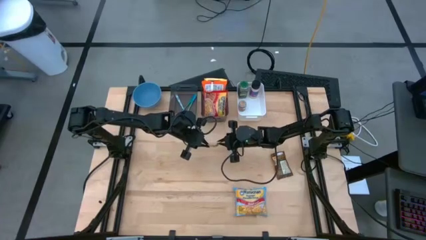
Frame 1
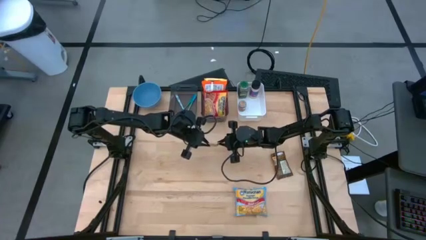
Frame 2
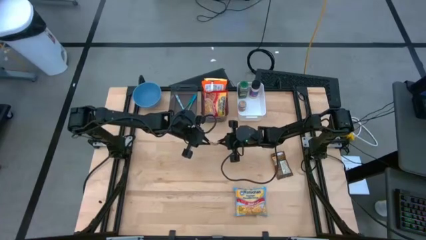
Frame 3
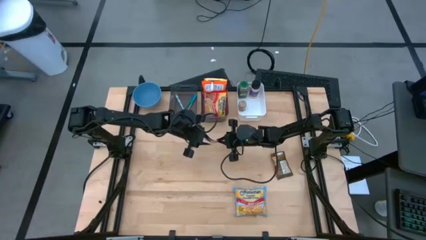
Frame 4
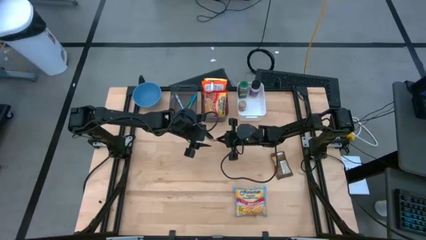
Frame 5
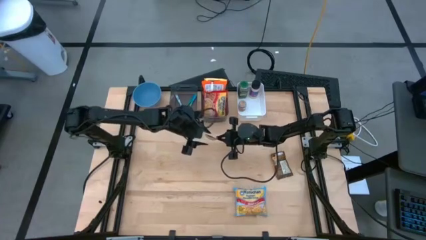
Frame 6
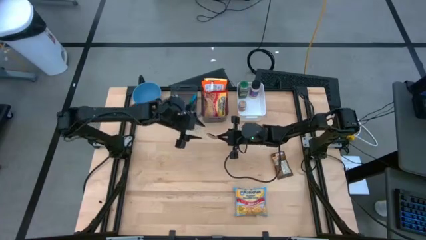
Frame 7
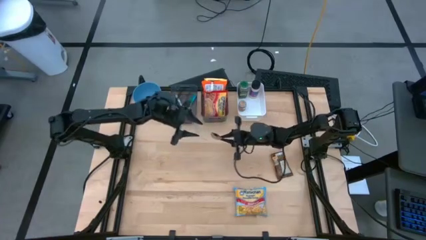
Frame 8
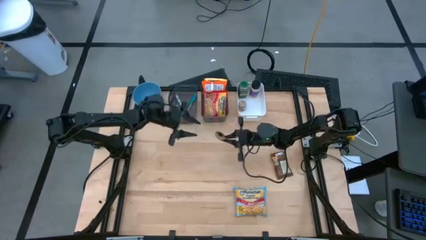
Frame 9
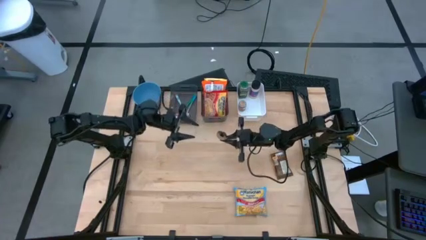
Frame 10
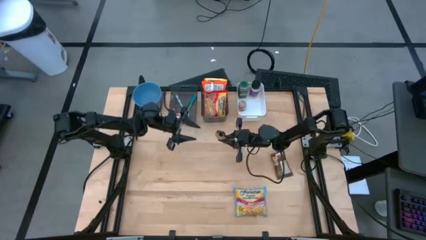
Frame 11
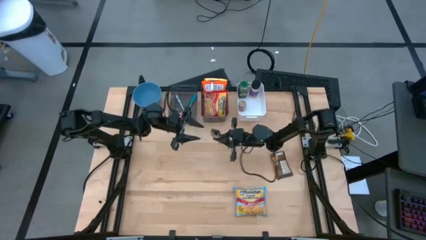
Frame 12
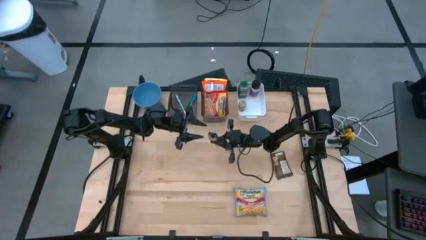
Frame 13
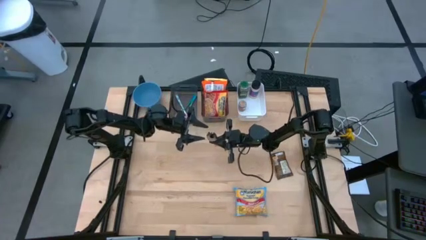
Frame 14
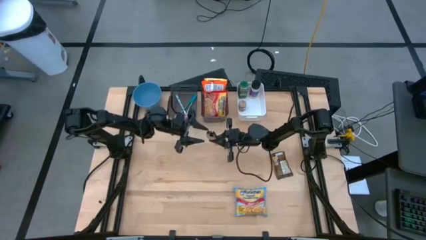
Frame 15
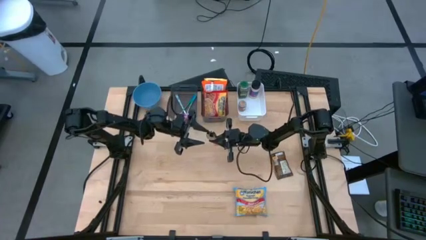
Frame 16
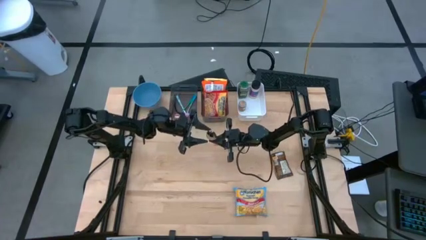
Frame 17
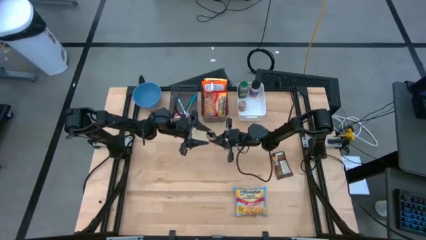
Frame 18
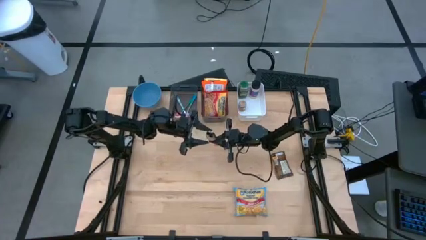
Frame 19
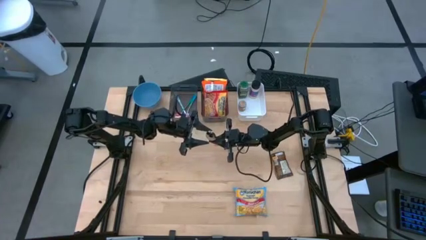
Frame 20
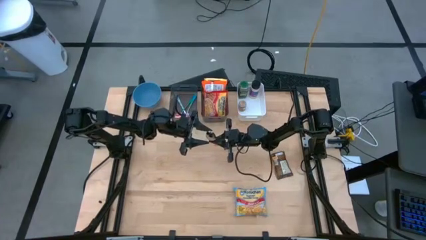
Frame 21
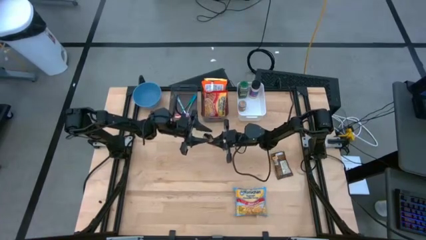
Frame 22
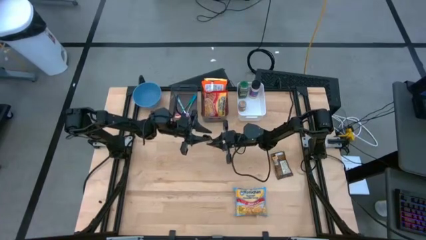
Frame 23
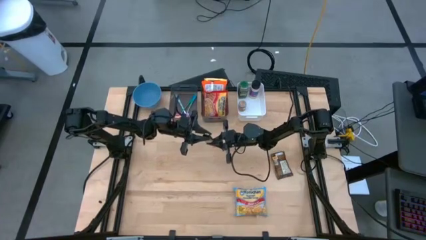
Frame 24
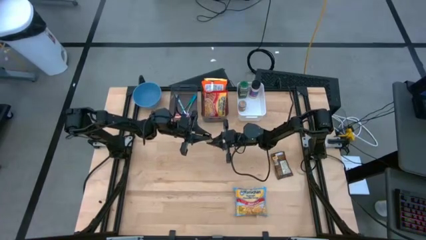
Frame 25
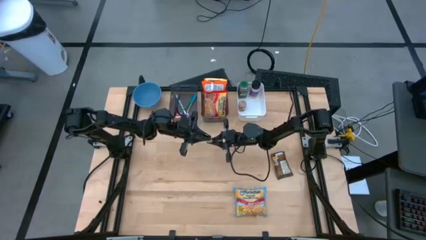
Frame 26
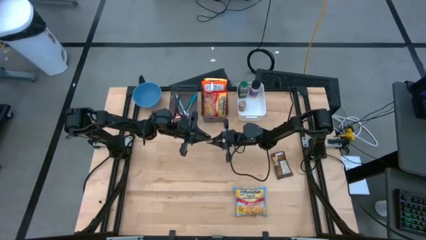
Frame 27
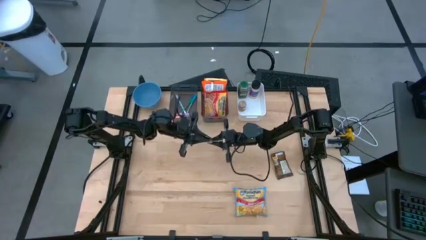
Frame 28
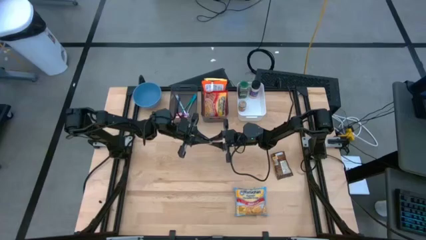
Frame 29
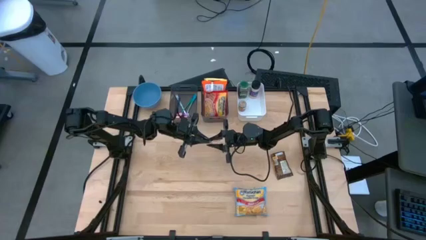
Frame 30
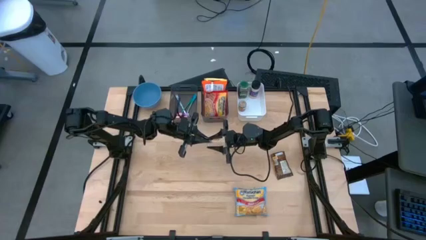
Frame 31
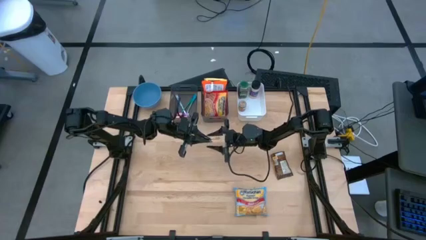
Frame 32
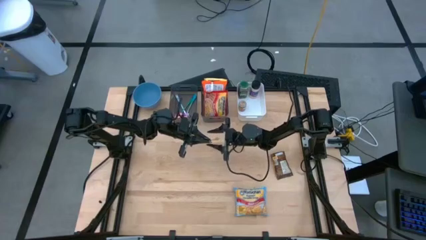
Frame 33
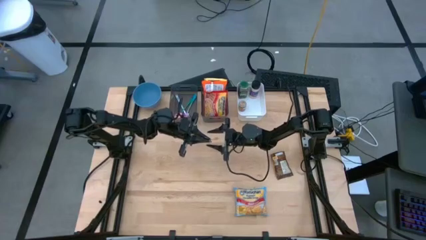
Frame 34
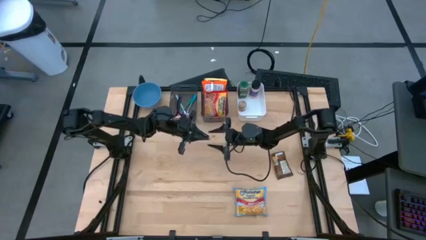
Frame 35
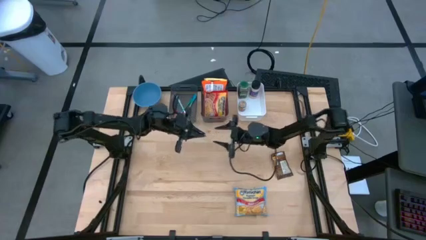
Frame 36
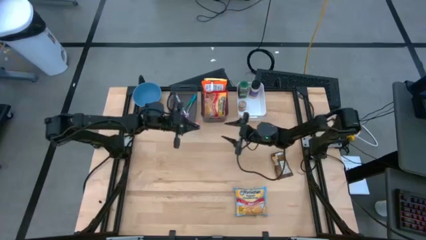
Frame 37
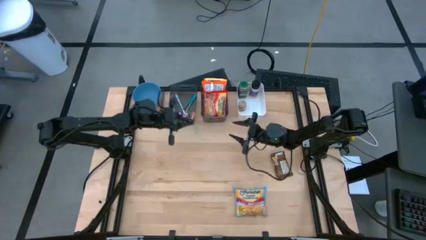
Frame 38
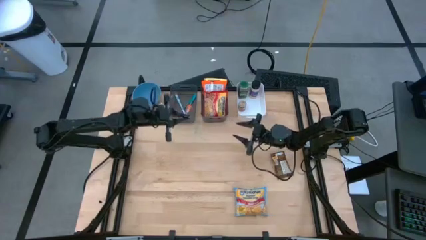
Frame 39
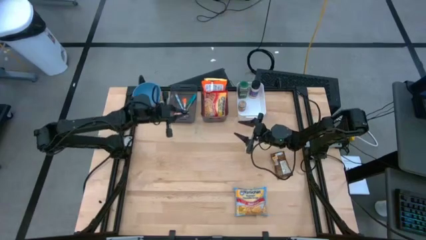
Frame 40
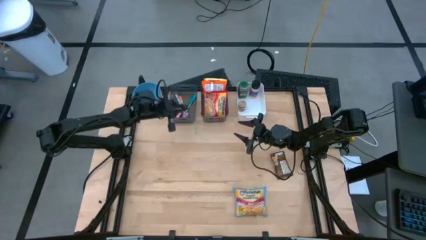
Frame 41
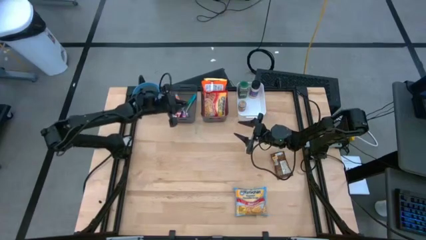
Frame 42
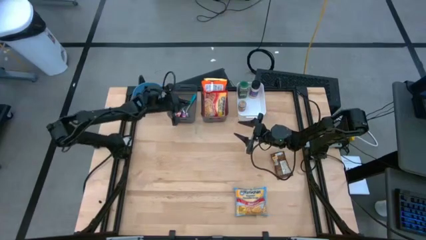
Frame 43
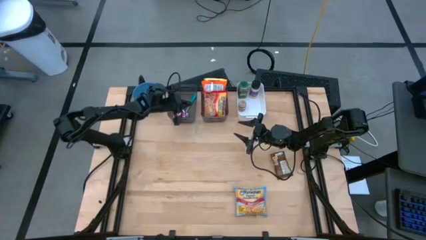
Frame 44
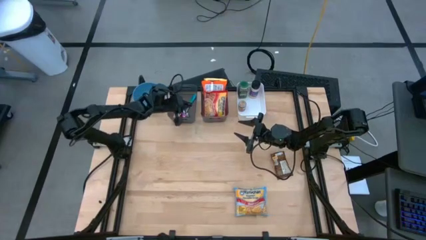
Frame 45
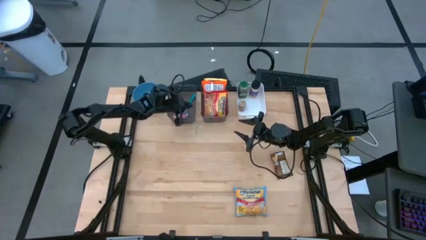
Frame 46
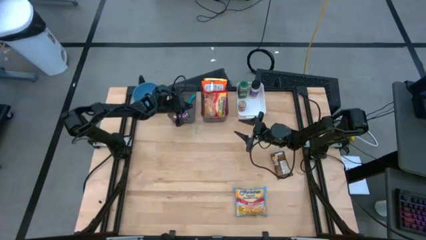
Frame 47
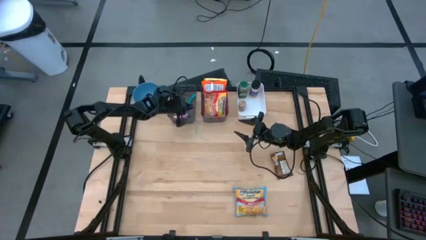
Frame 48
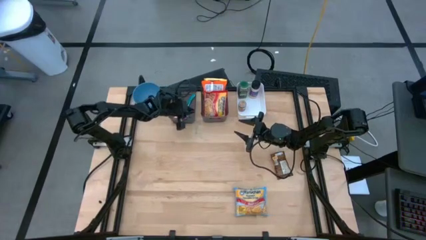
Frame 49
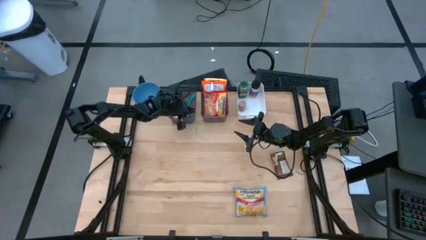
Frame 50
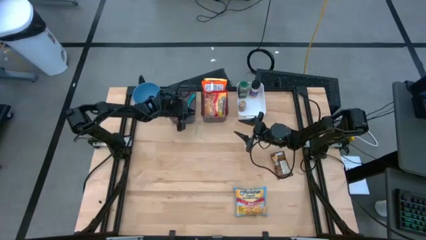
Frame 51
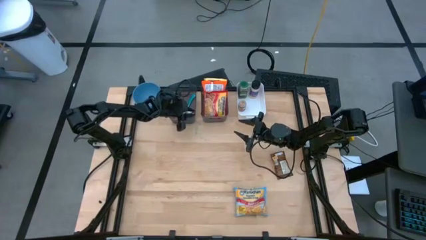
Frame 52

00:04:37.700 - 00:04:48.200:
Task: Pick & Place Food Item
Put the orange spoon into the left black bin

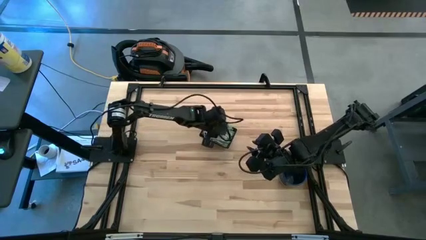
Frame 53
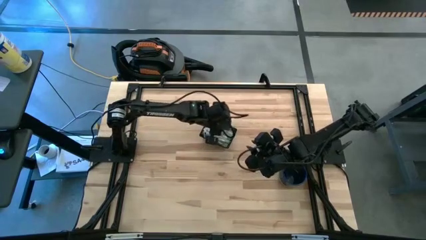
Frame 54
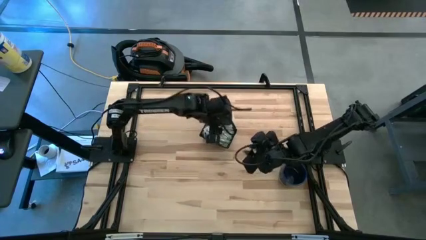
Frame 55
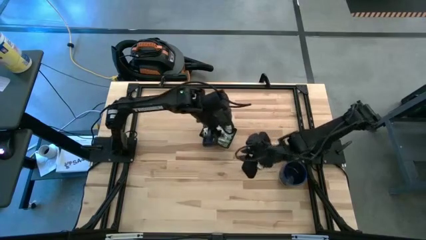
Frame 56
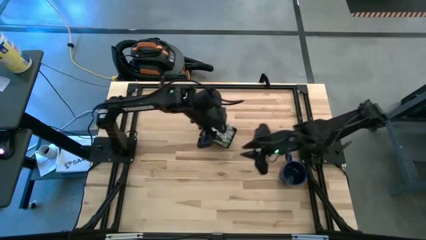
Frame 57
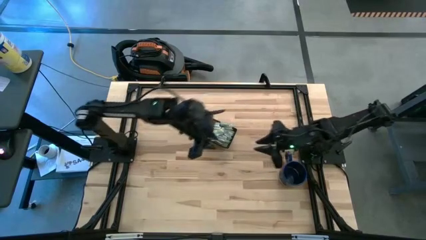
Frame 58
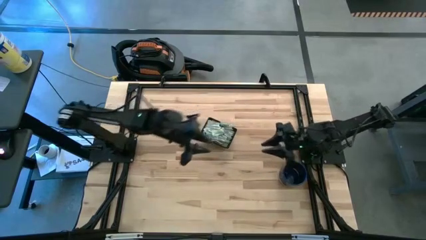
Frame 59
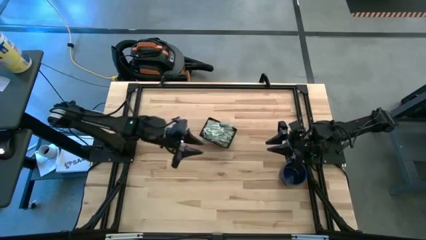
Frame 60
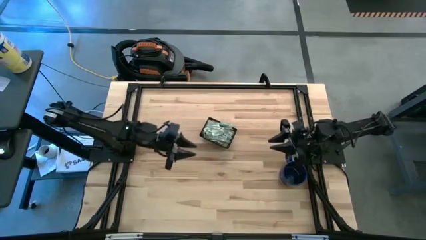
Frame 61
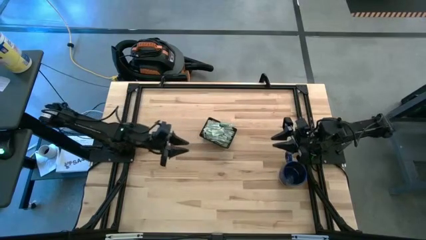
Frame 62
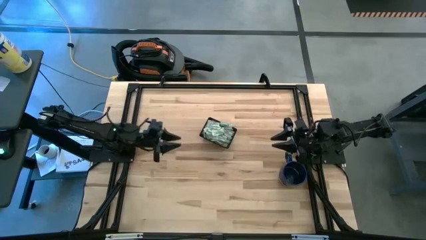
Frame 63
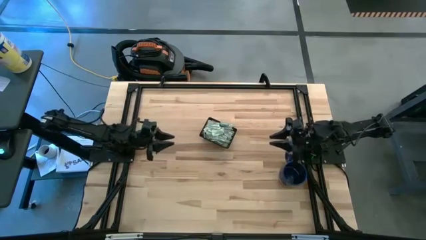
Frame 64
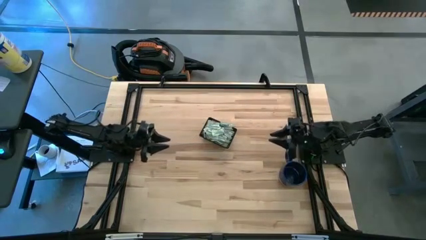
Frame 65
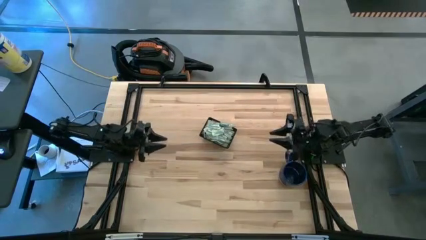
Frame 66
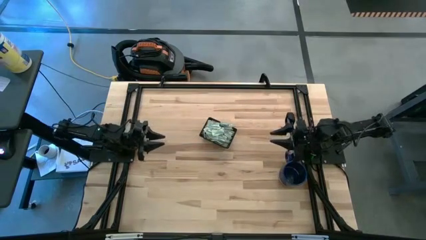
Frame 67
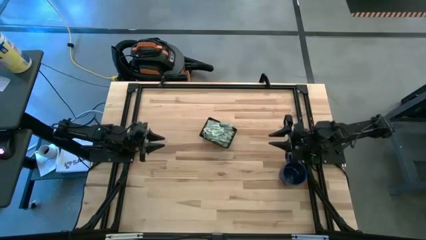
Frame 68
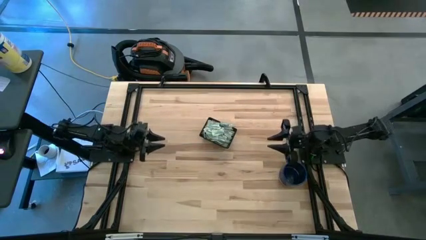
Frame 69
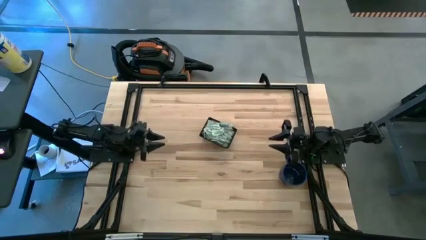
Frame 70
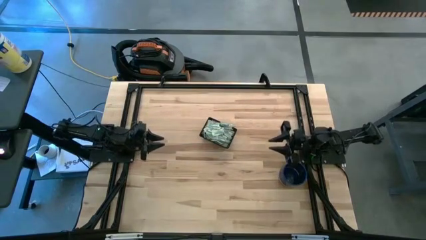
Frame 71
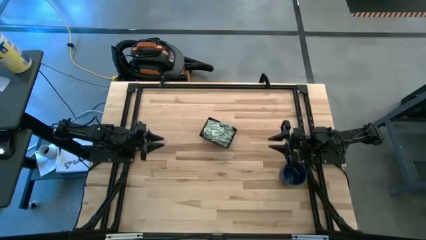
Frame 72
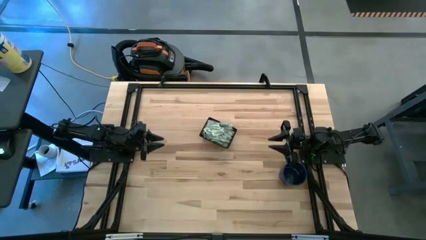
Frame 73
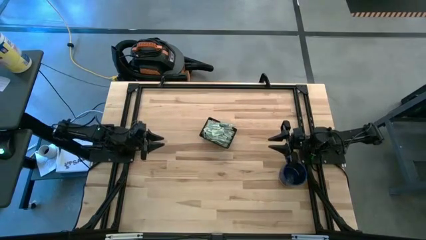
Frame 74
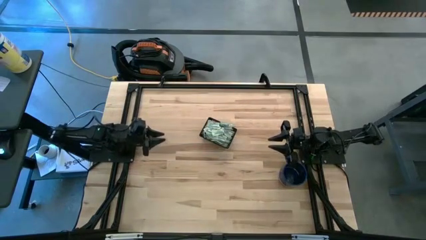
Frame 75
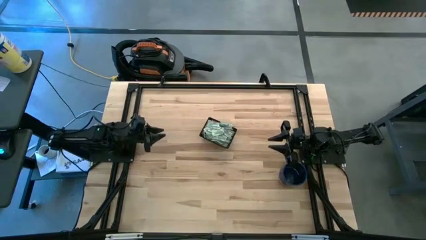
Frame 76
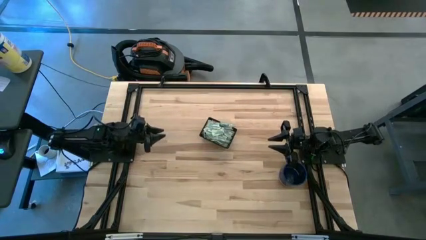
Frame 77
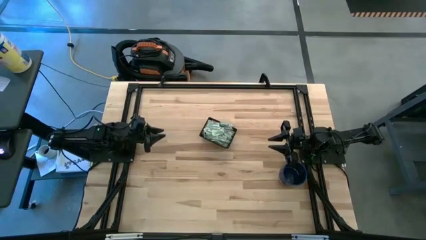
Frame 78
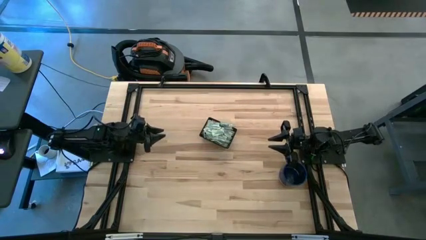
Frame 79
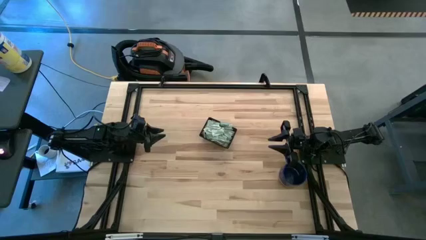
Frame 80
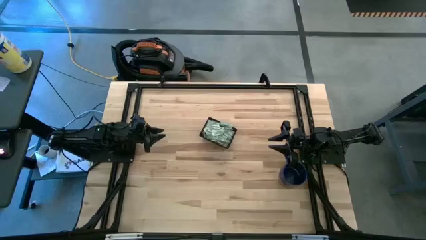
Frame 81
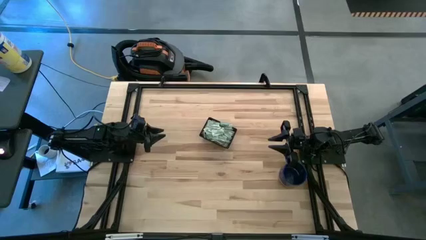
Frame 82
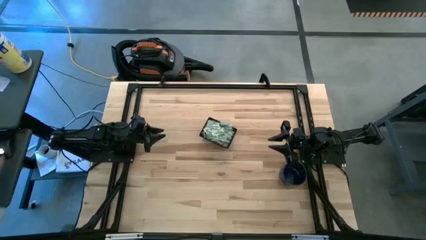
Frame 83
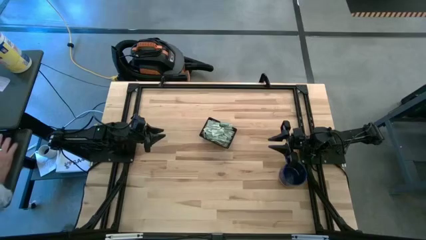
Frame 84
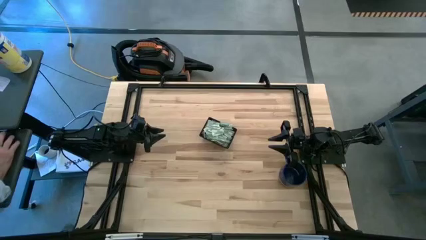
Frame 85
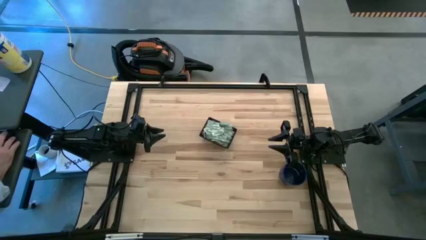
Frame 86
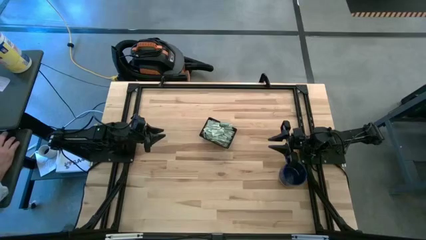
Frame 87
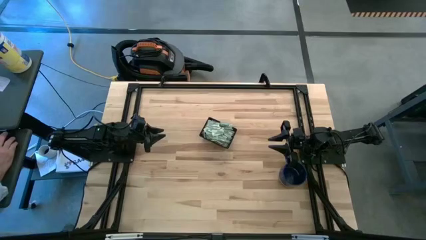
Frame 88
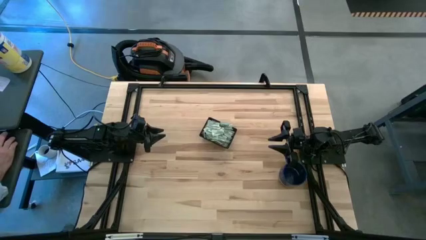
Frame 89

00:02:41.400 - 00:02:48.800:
Task: Pick and place Stevia / Truvia into bins
Return to Home Position
